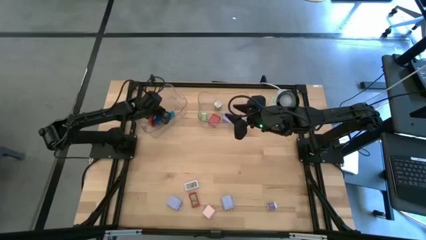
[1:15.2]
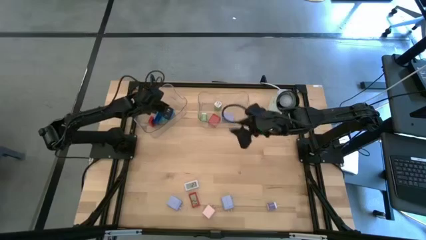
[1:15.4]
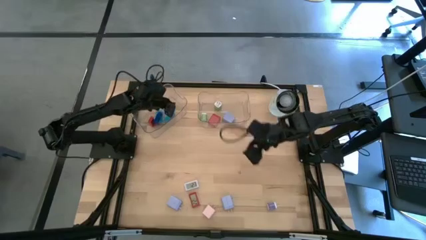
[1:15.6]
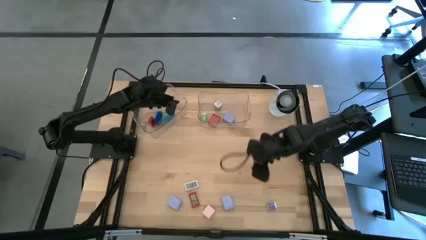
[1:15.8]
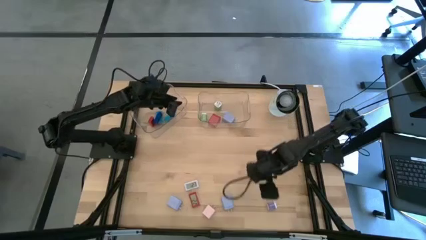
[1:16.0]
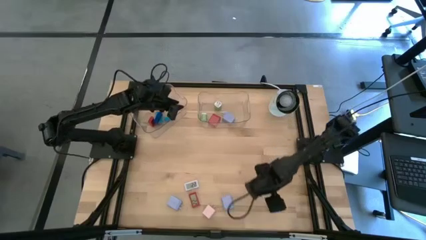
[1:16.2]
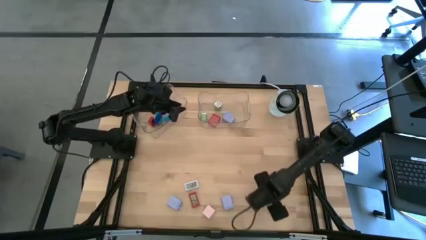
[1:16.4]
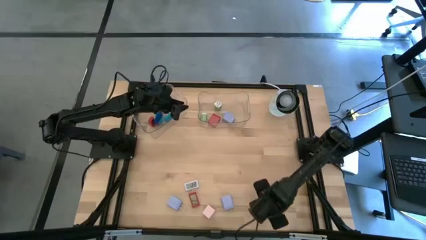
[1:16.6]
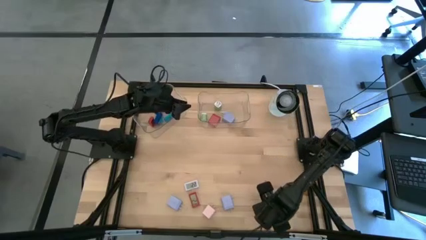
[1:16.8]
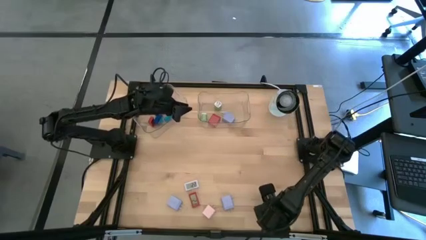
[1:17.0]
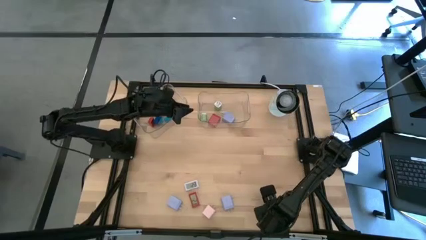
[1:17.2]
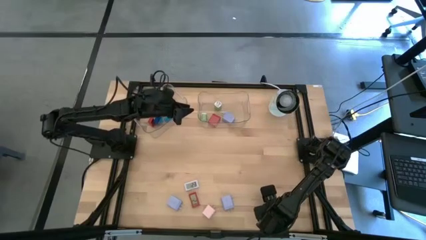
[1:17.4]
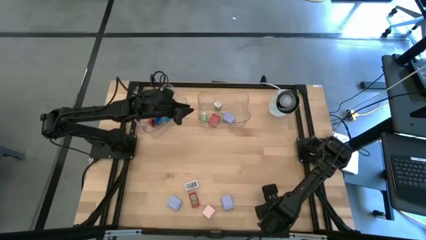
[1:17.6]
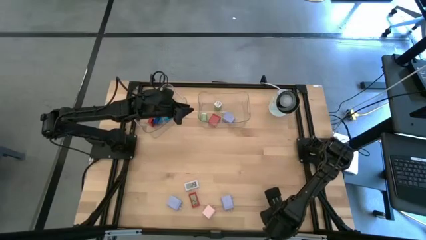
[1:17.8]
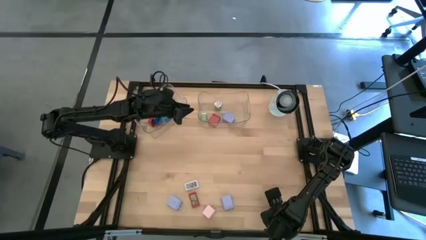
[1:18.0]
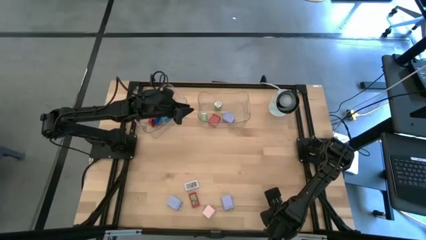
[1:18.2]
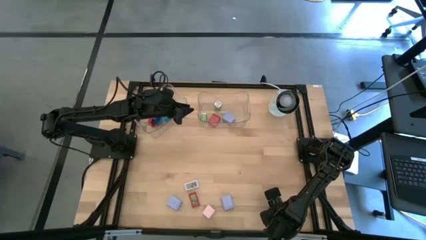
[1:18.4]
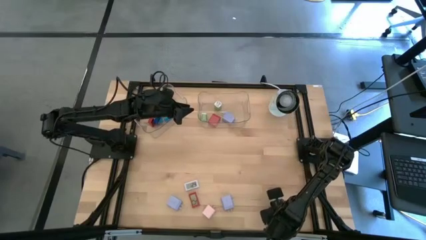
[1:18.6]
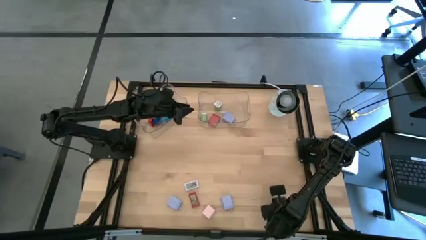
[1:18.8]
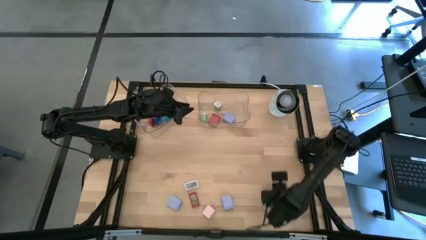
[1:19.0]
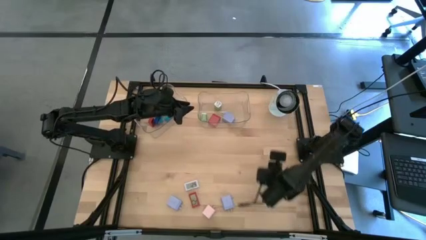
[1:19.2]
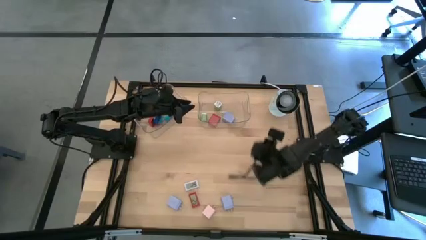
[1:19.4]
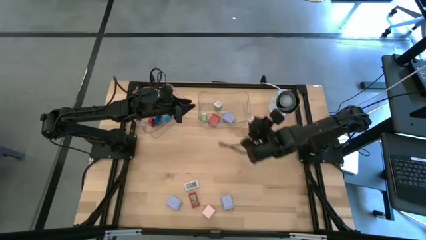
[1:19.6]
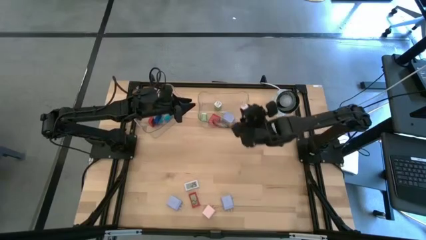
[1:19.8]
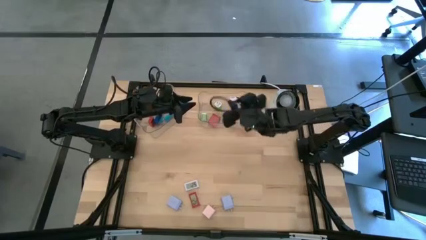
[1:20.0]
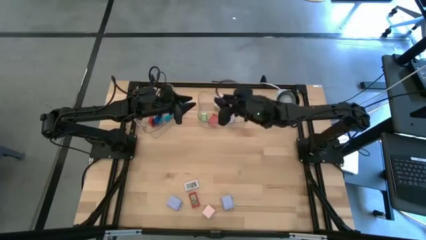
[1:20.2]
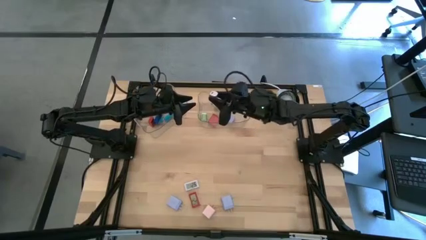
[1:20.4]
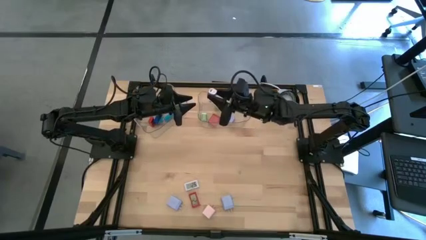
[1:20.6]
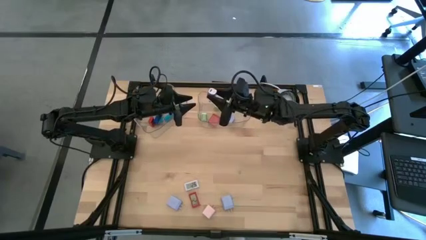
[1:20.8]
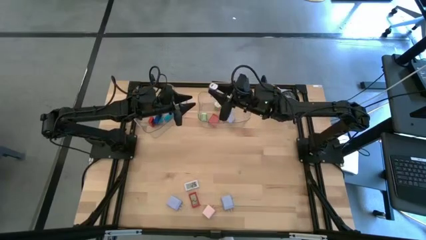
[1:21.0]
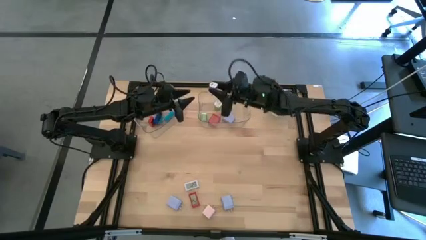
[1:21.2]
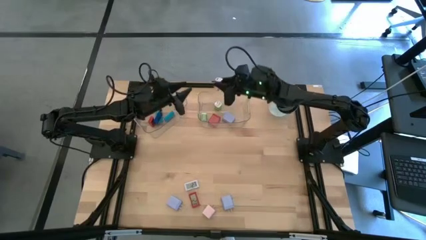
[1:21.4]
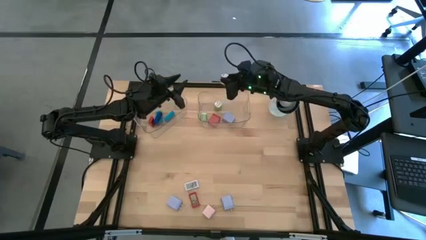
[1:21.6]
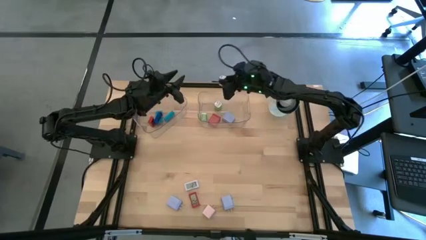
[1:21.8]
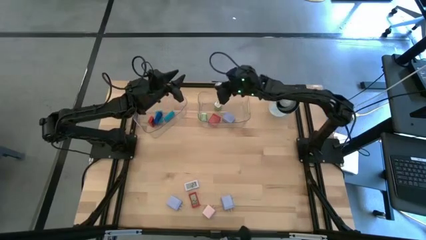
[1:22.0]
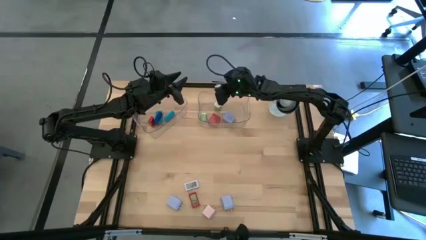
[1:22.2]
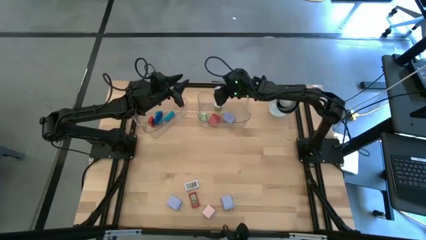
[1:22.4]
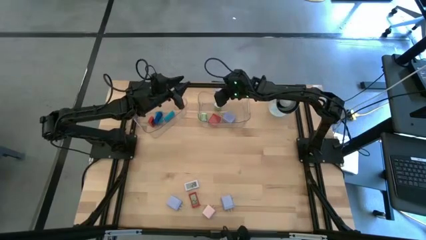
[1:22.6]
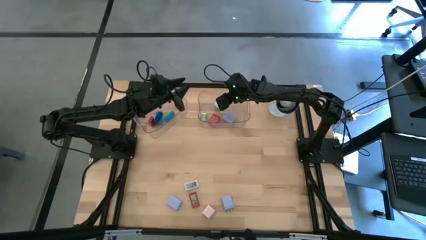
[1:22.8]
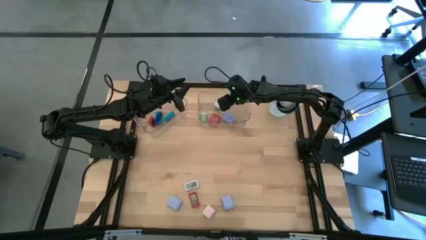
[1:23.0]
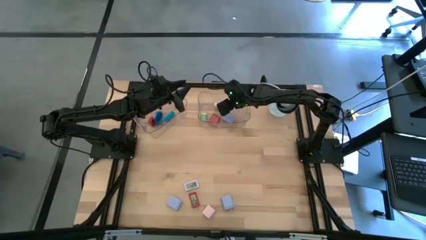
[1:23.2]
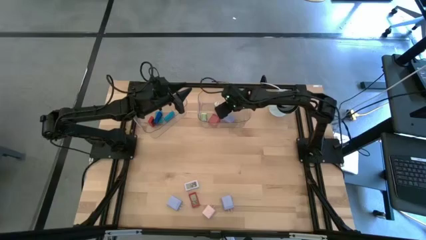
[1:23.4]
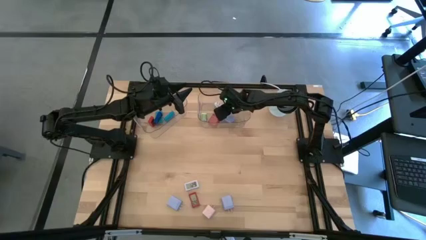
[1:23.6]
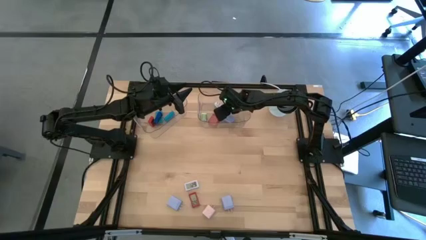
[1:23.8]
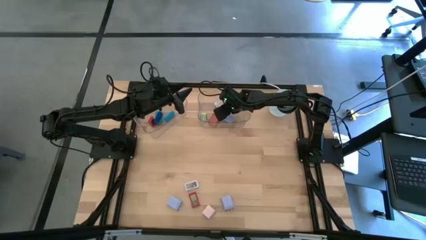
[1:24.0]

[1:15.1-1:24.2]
Task: Pick & Place Office items
Put the dark blue charger adapter into the right transparent bin

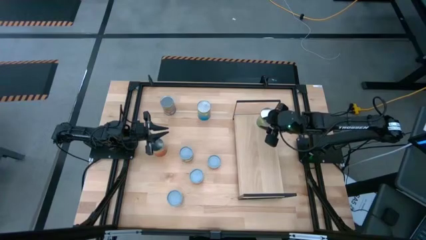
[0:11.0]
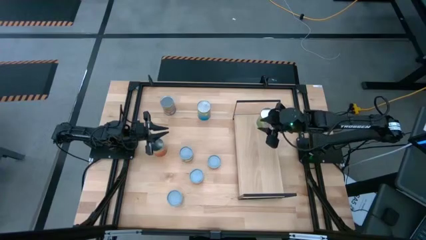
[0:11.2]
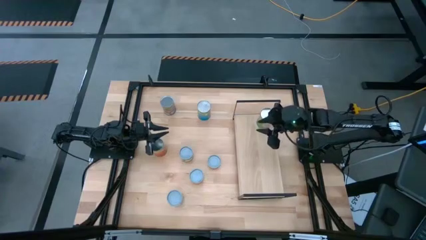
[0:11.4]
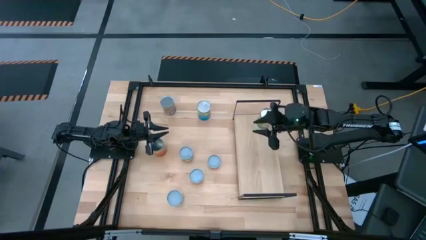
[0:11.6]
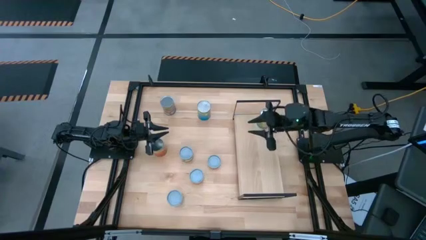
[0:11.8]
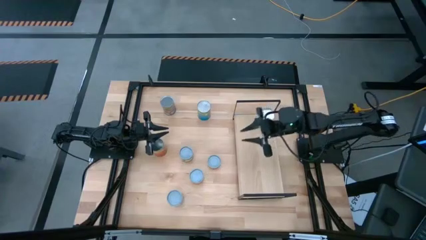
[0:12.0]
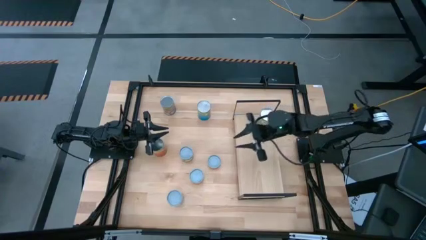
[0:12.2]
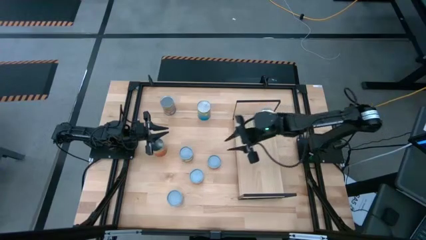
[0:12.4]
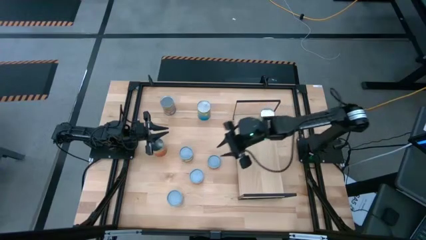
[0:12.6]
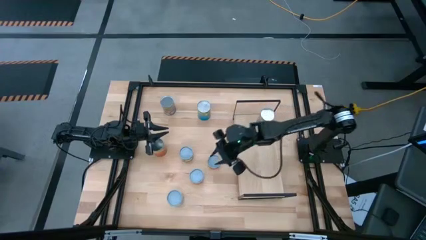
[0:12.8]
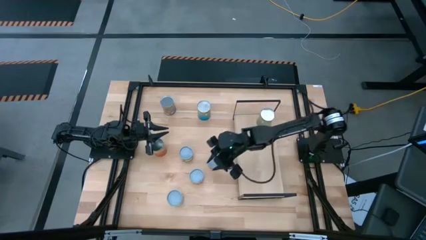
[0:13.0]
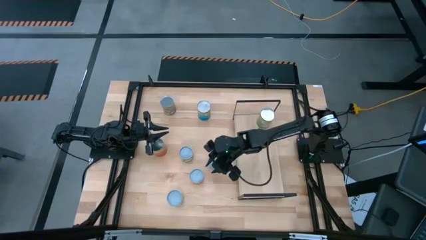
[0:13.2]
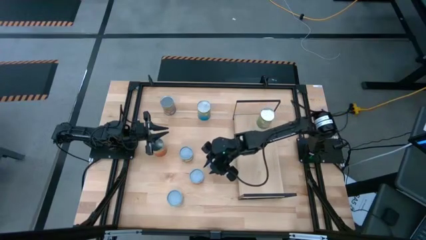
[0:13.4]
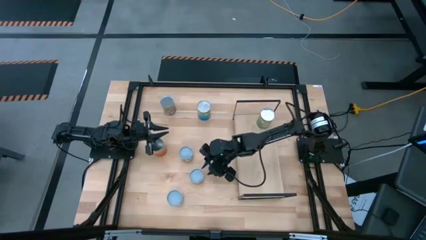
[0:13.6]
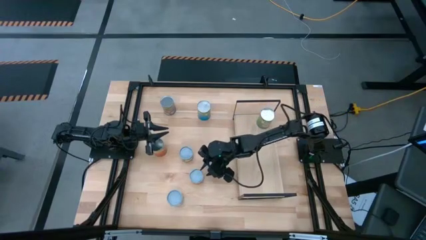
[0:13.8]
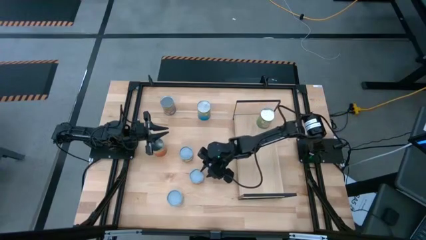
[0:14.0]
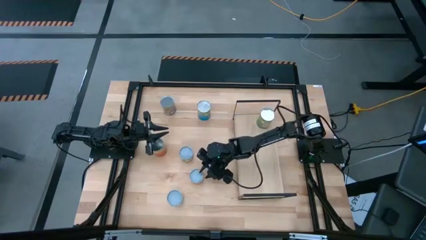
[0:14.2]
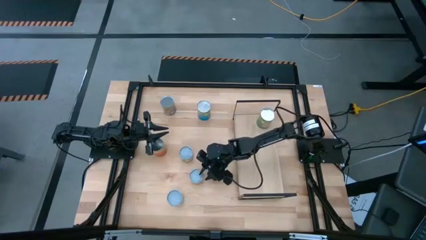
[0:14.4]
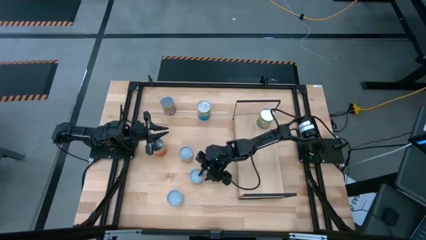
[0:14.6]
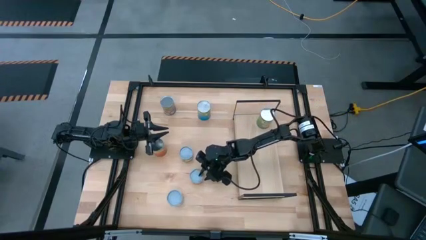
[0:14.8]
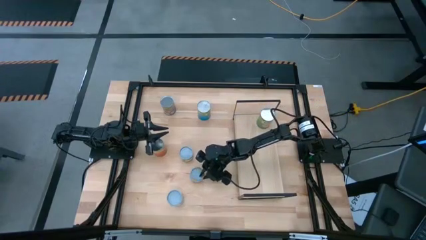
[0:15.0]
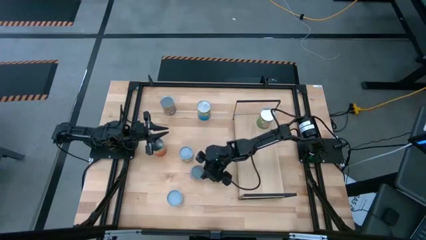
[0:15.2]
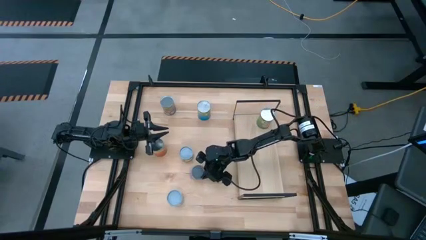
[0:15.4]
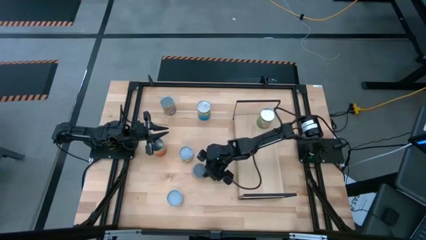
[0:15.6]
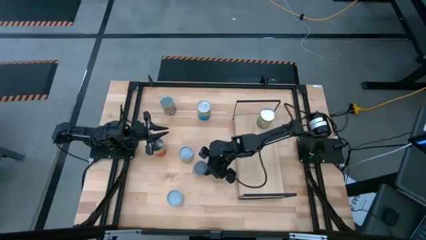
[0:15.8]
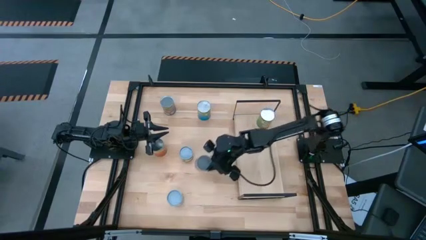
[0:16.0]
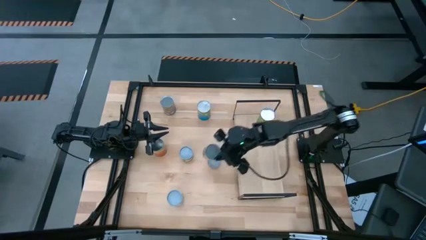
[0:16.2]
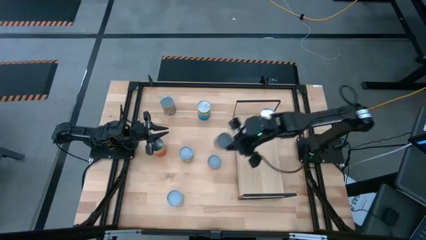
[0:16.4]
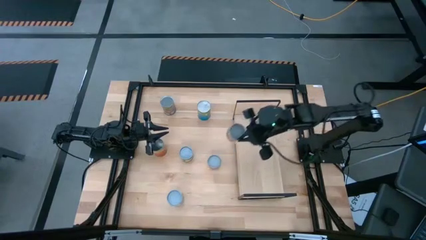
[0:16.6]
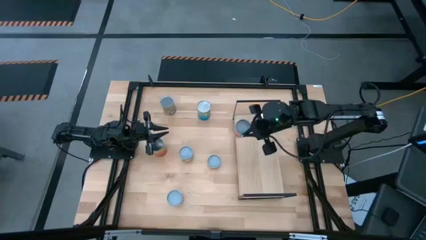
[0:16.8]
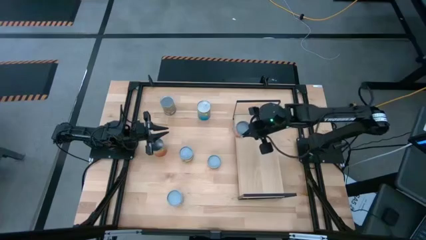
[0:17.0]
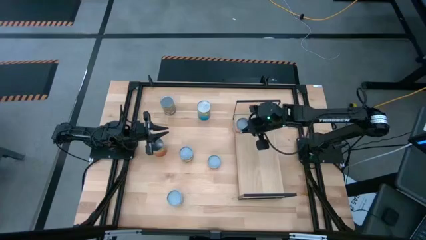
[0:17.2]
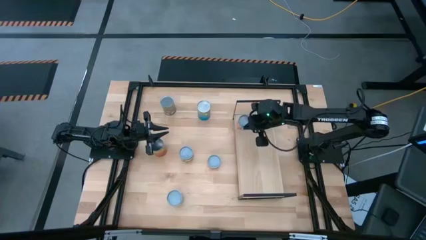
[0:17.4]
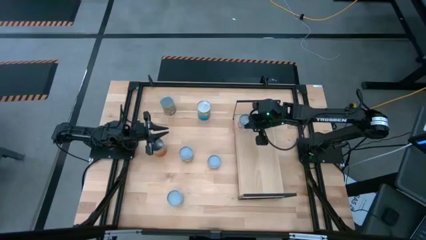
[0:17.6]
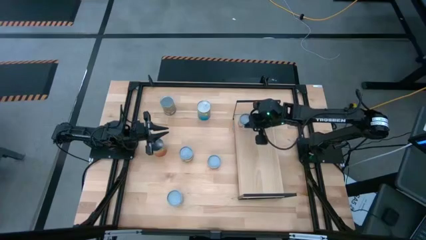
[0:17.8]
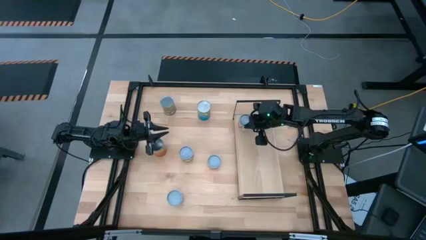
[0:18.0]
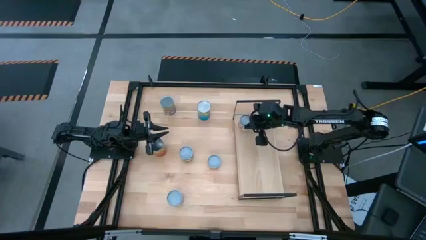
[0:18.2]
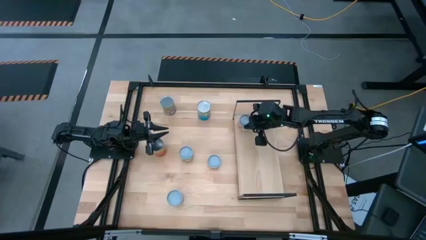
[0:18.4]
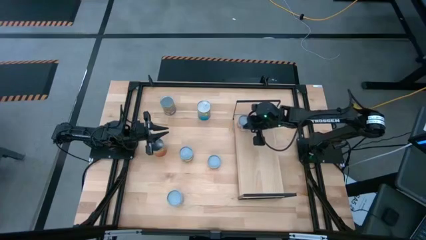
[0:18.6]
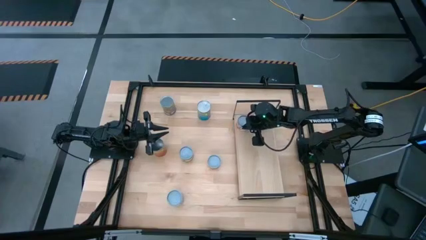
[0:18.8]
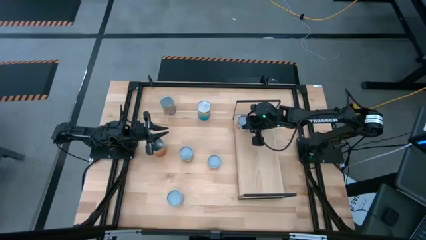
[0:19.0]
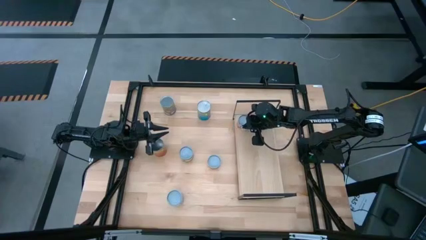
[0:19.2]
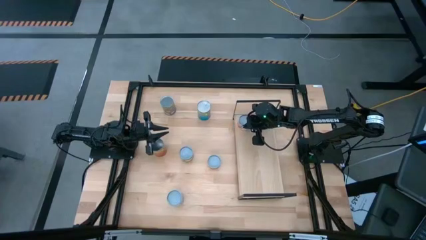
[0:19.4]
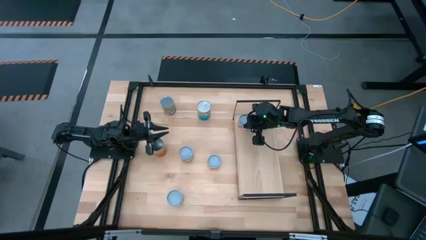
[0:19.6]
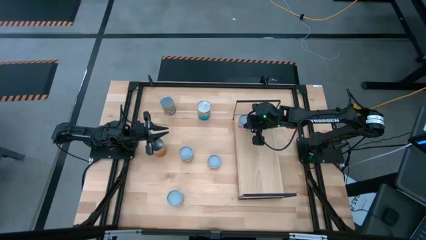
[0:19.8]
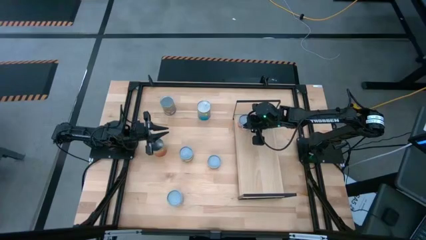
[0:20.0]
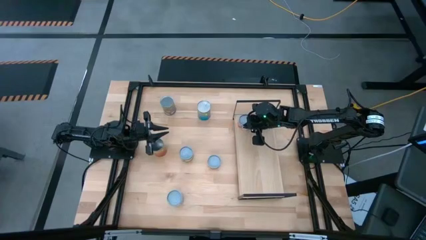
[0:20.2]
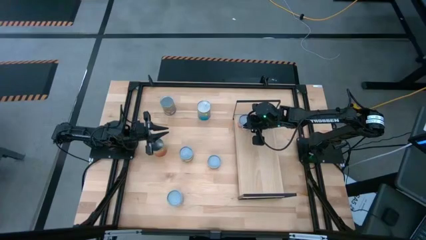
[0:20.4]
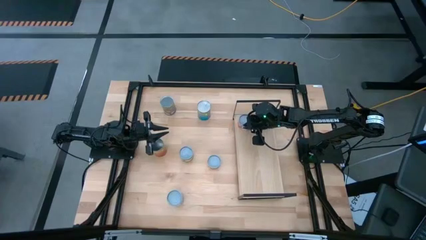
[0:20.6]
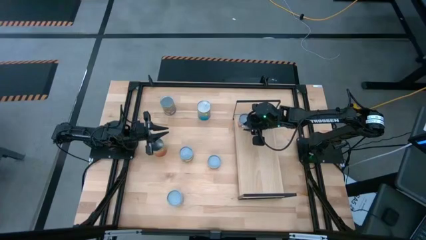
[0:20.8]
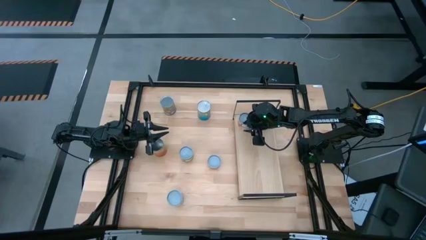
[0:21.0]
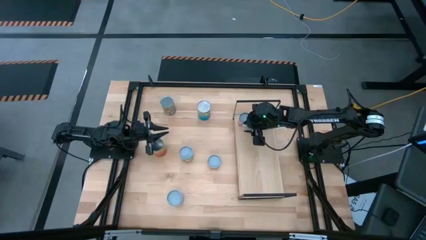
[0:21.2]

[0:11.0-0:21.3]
Task: Pick and place cans onto a shelf
Put the small canned oranges on the shelf
